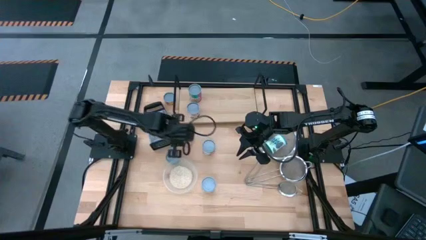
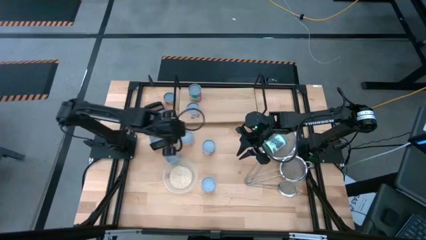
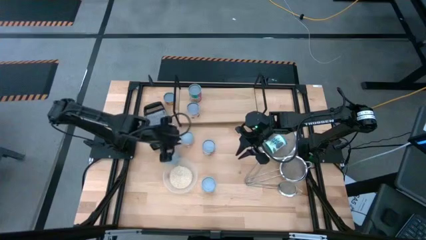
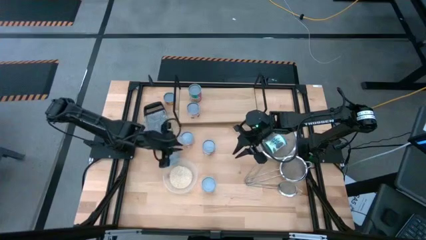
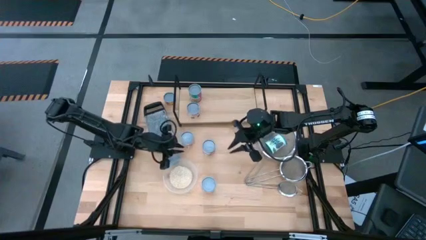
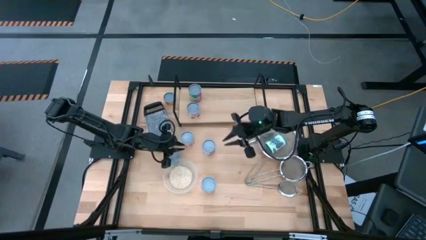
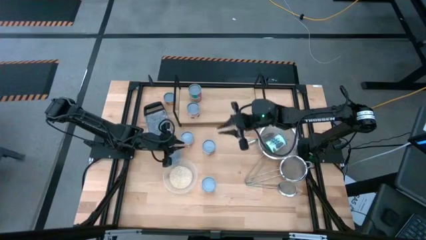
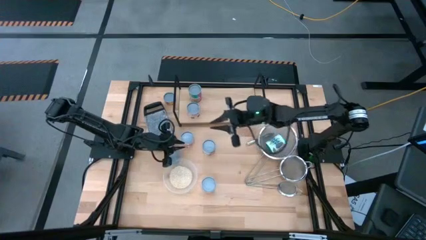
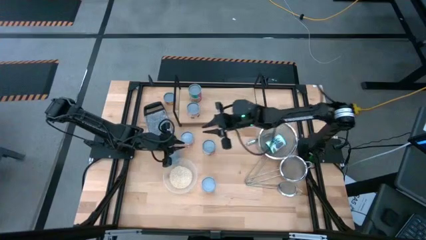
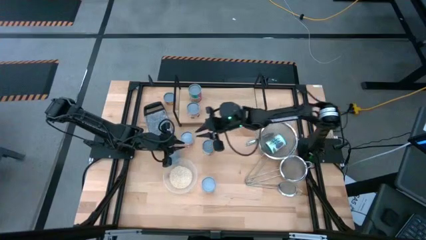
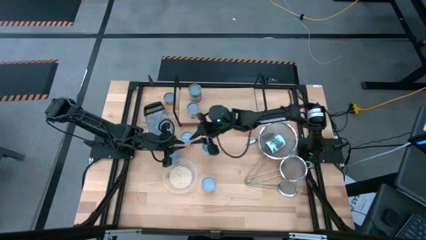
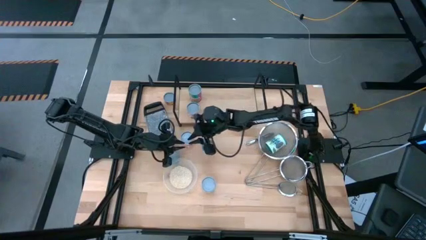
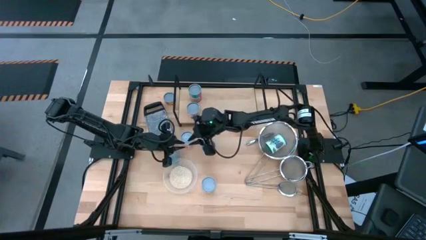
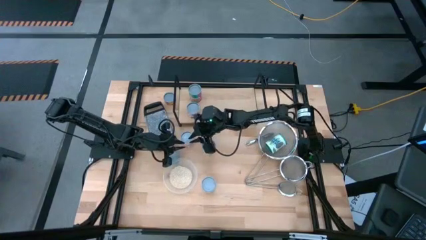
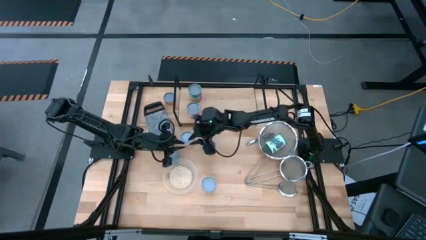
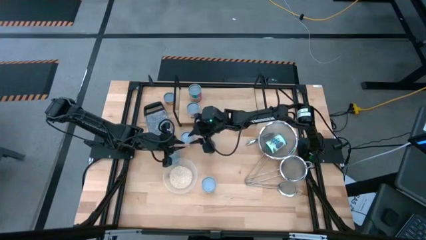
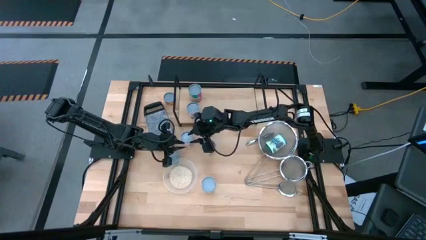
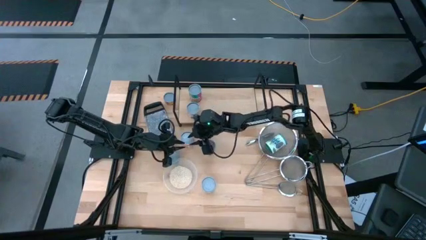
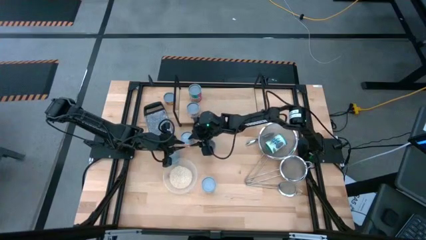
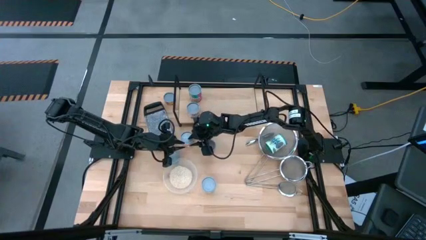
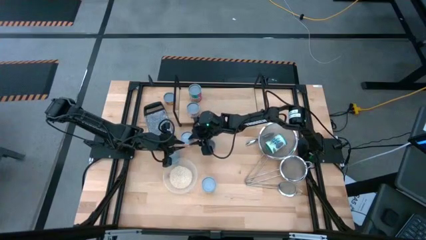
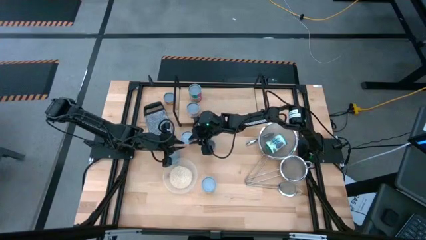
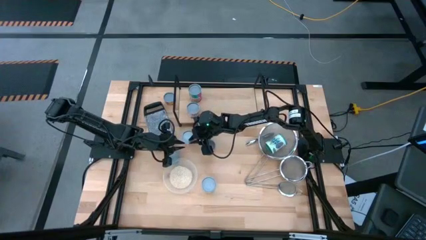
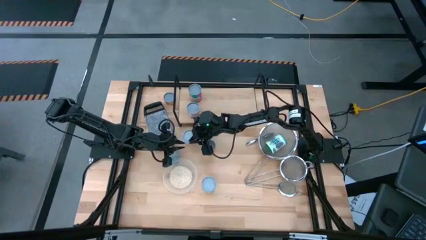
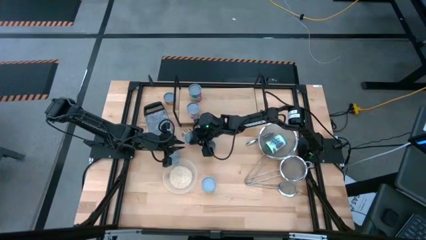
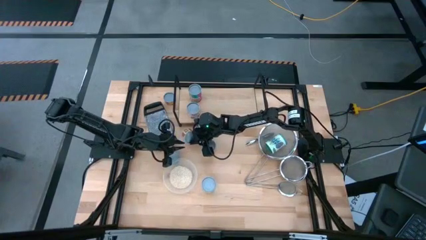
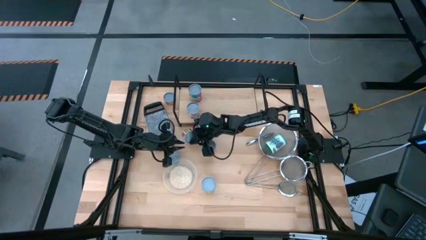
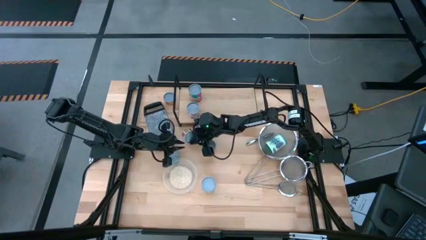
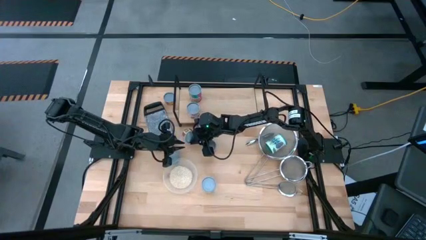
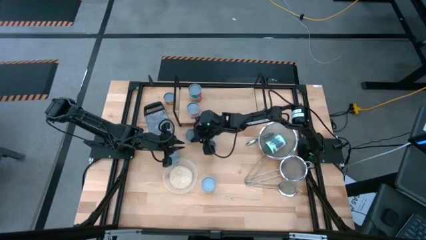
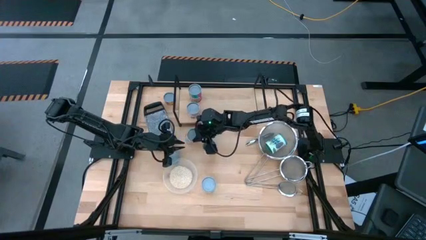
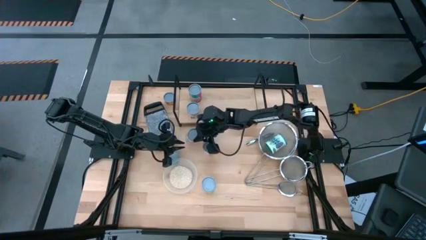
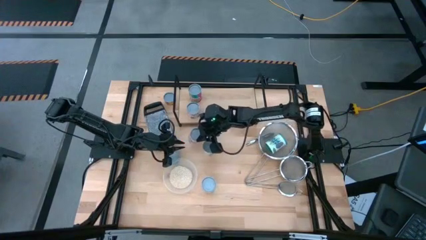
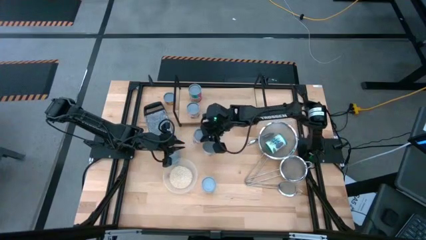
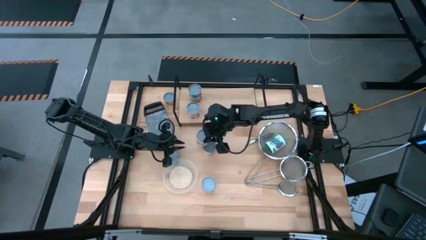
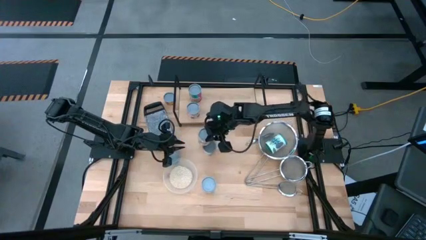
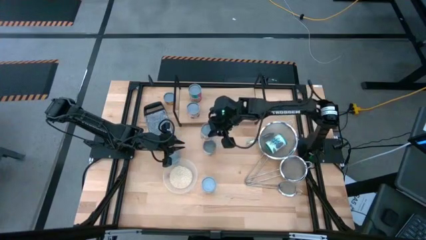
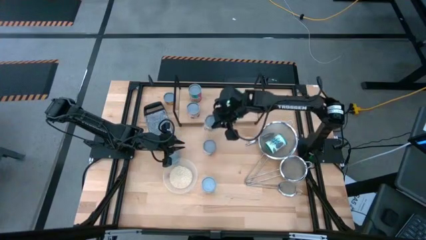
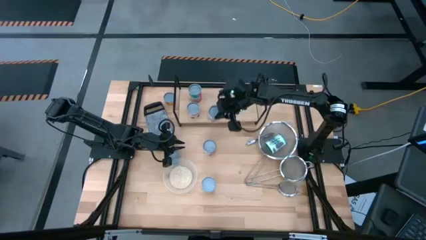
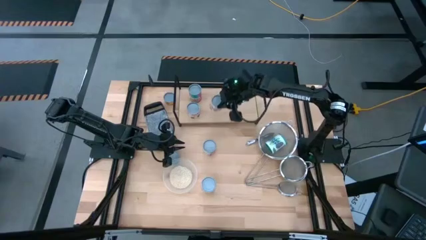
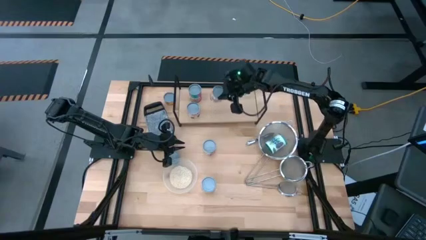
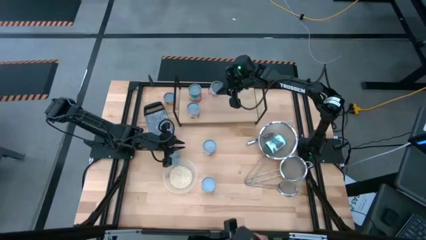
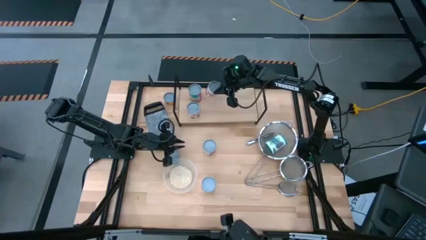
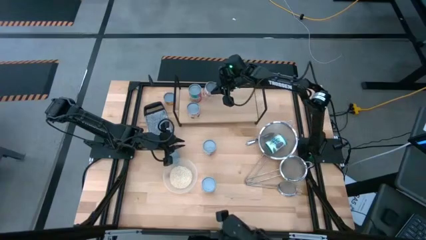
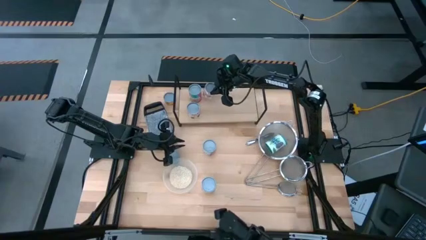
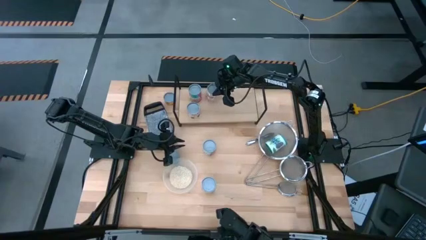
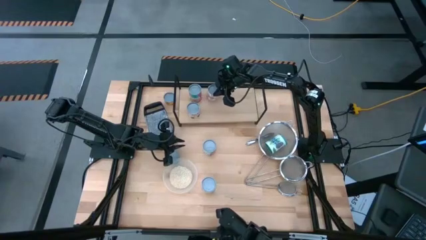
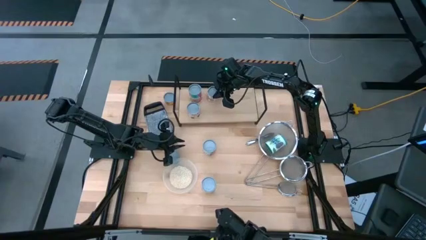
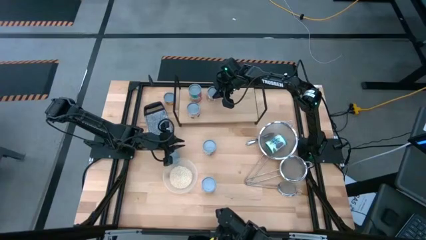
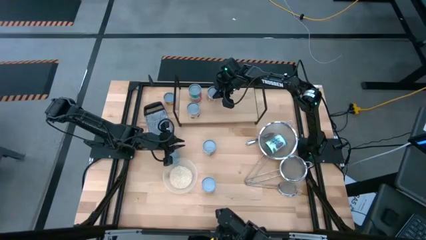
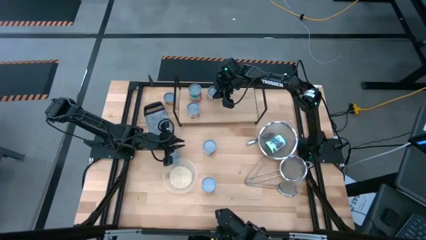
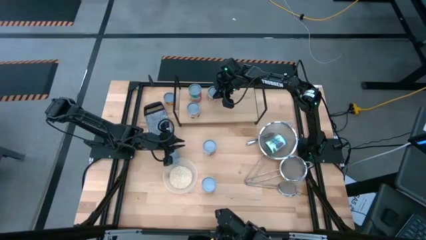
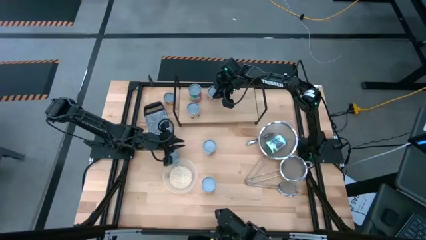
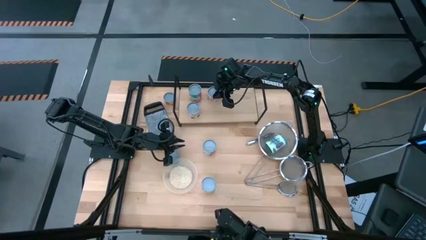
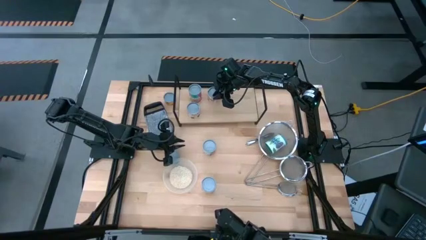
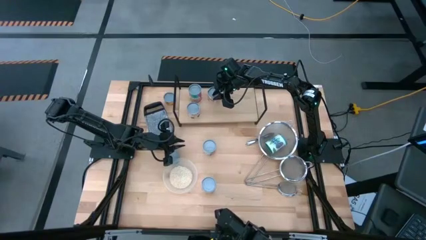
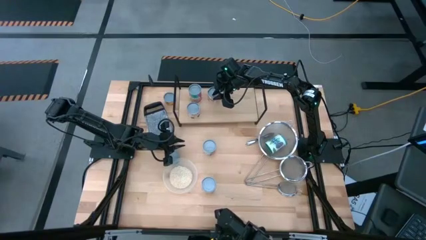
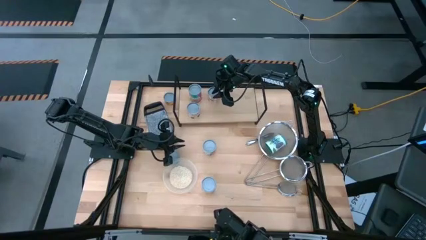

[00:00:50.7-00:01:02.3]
Task: Pick and place cans onto a shelf
Put the pink diced tomato can on the shelf
